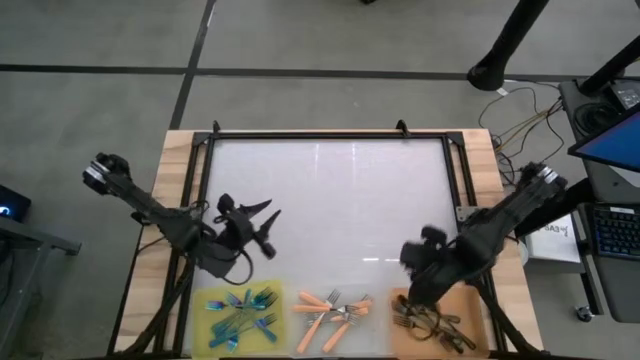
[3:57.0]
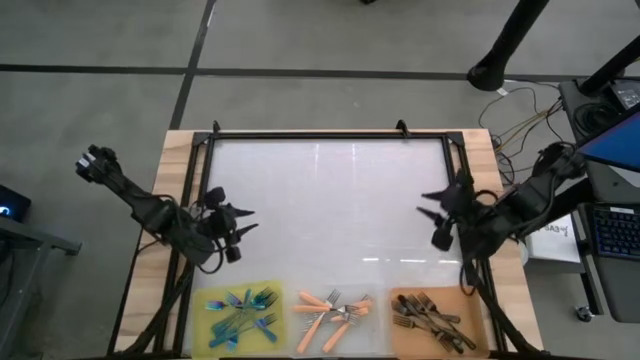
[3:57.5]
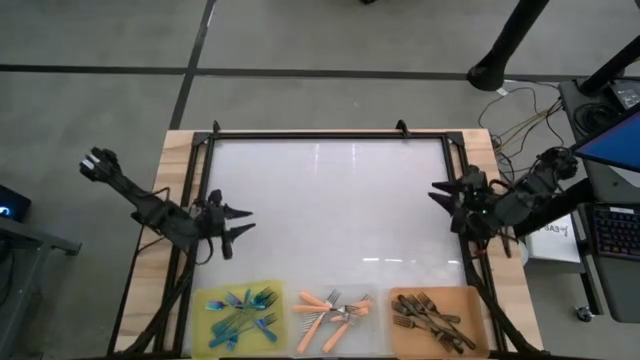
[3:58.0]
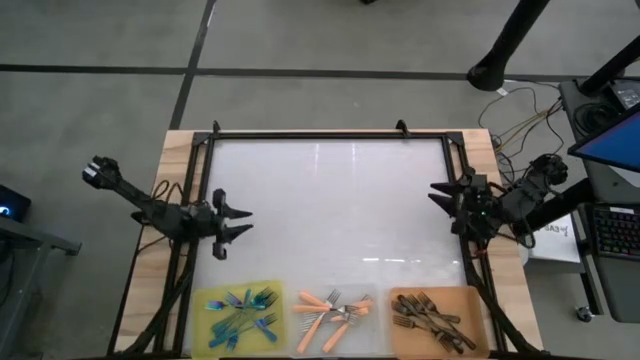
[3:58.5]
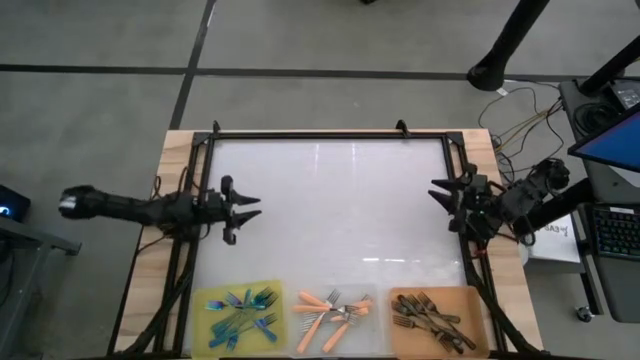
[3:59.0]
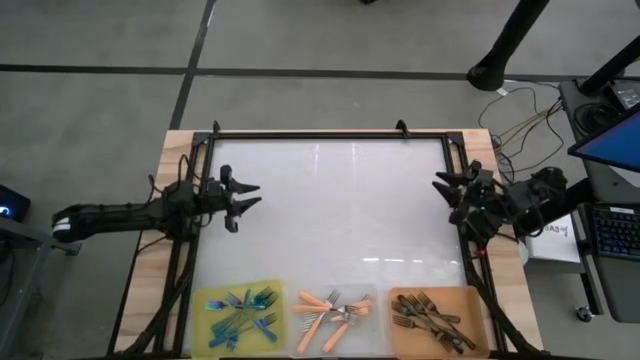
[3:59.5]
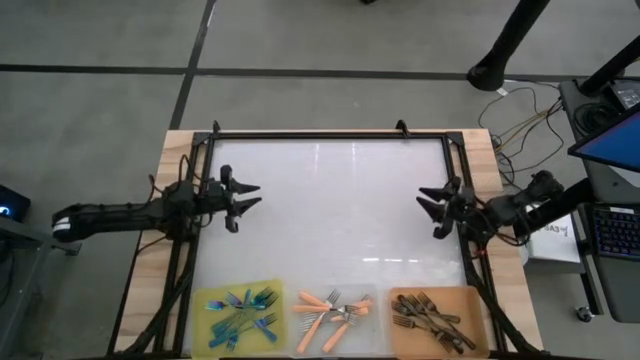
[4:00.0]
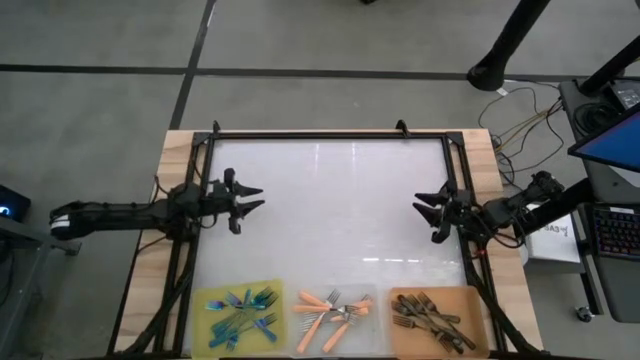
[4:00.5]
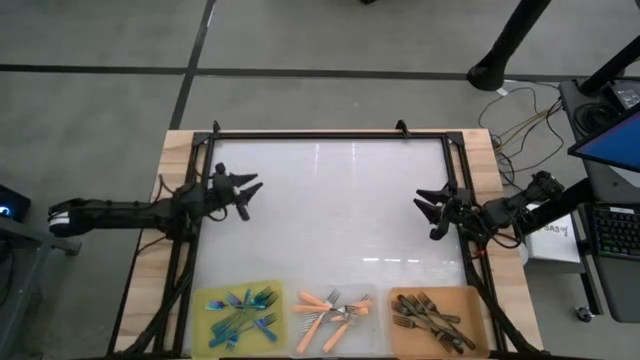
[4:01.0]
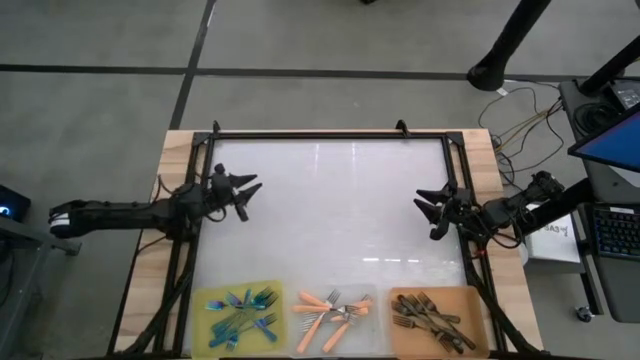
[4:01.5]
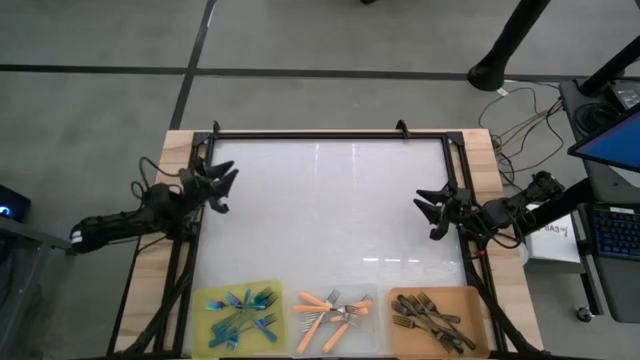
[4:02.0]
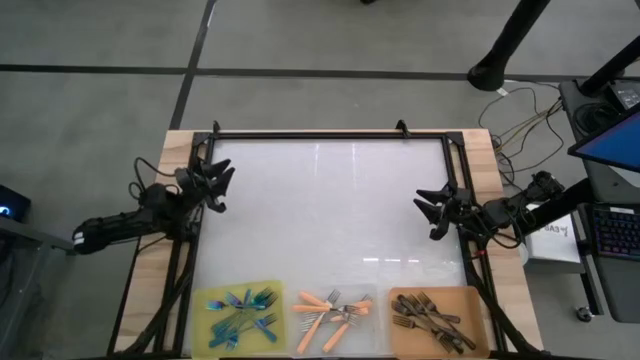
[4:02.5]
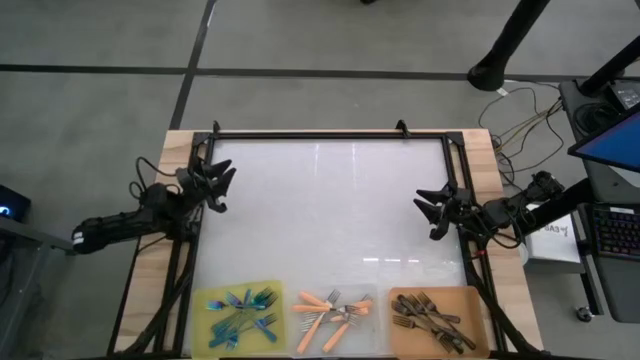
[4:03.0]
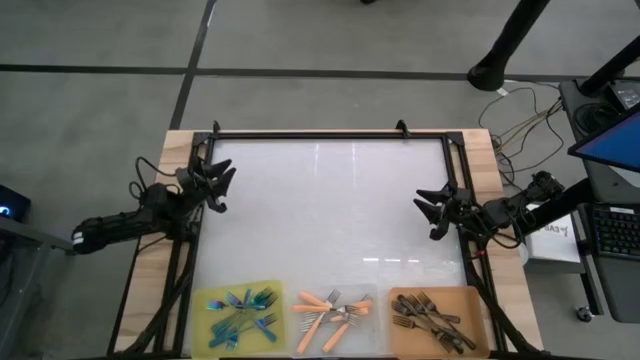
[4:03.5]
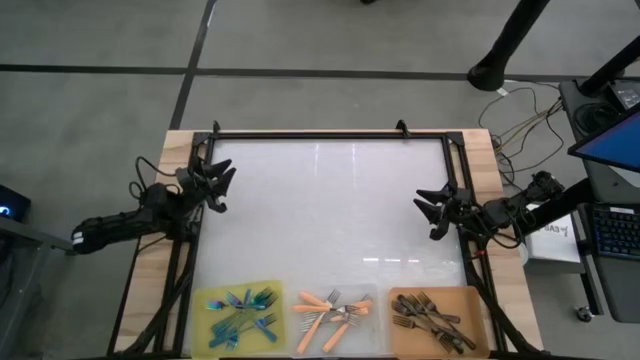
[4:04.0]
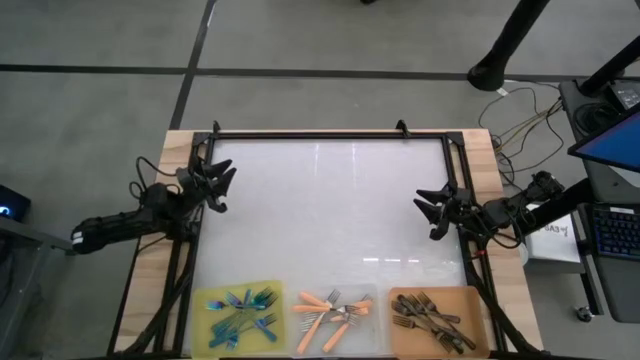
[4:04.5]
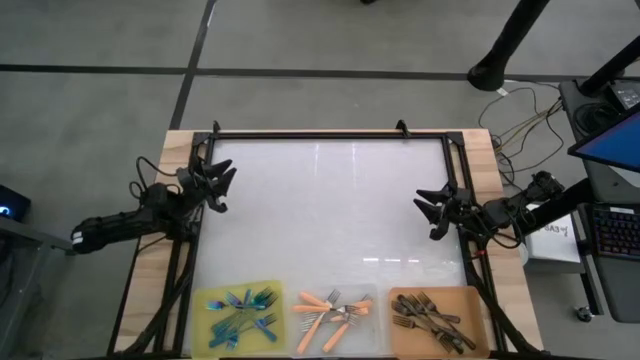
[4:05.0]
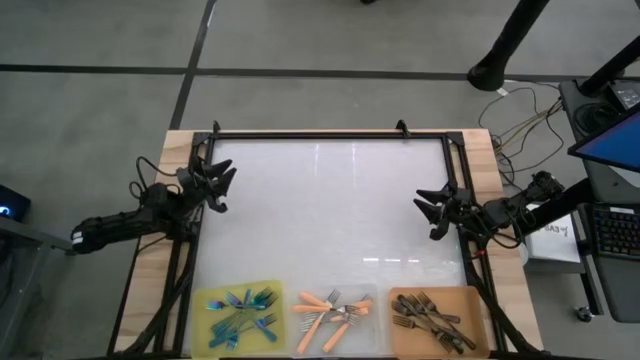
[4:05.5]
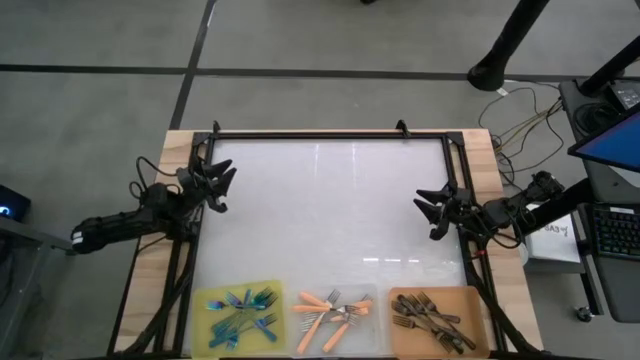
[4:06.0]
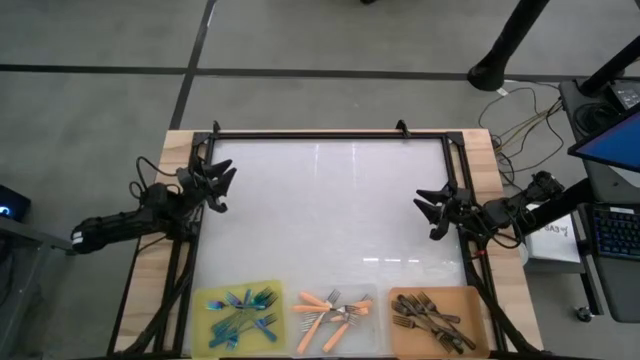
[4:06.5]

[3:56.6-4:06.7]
Task: Sort silverware by color (type)
Return to Home Position

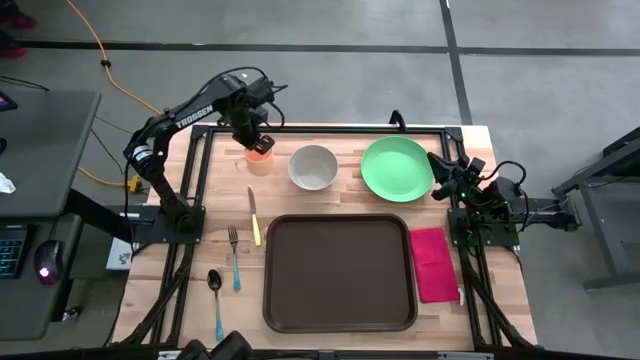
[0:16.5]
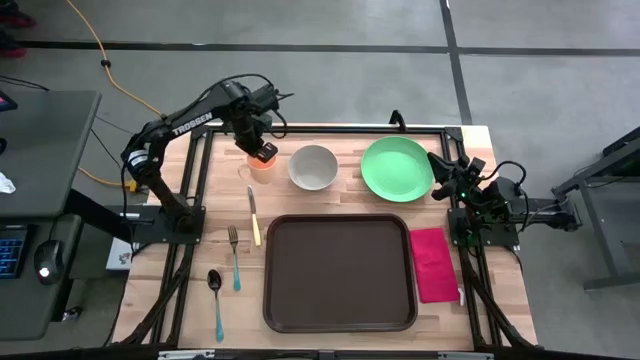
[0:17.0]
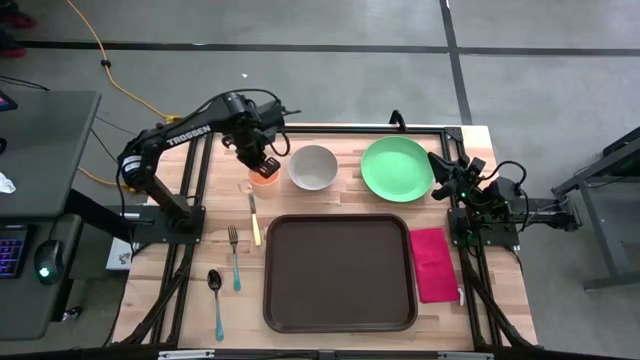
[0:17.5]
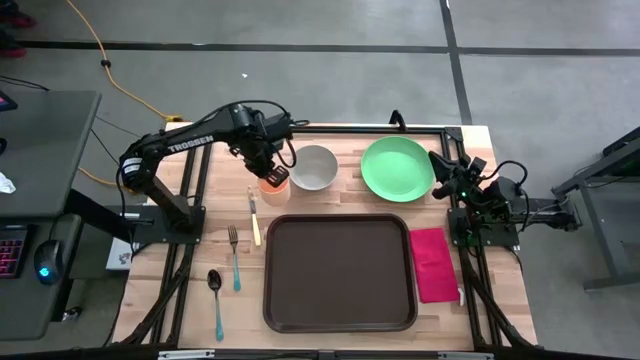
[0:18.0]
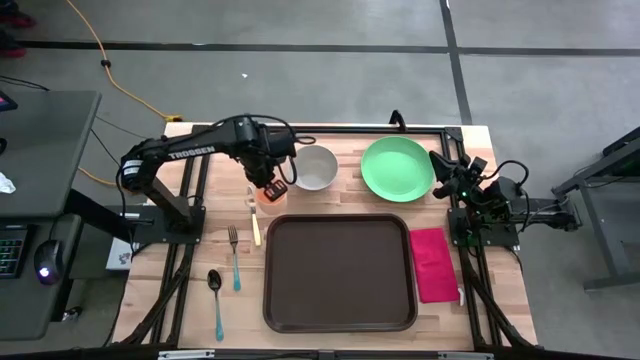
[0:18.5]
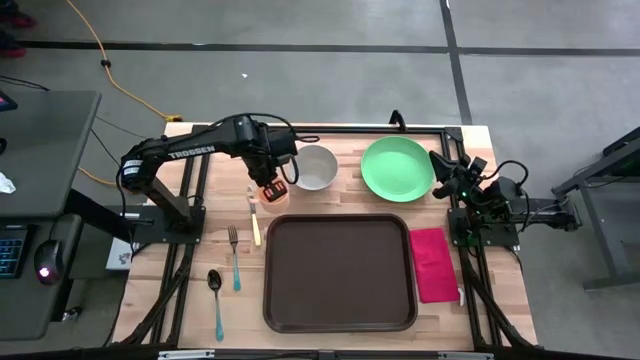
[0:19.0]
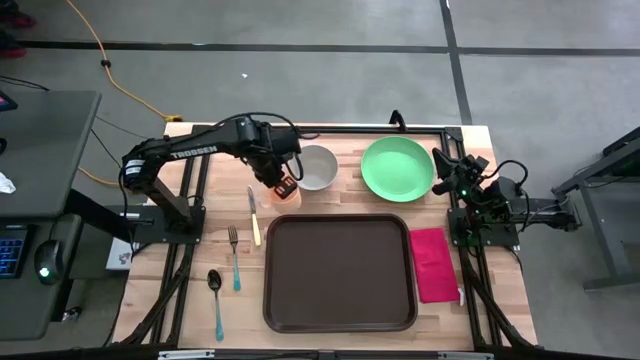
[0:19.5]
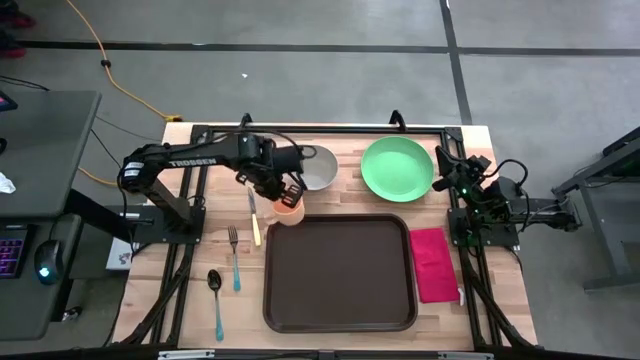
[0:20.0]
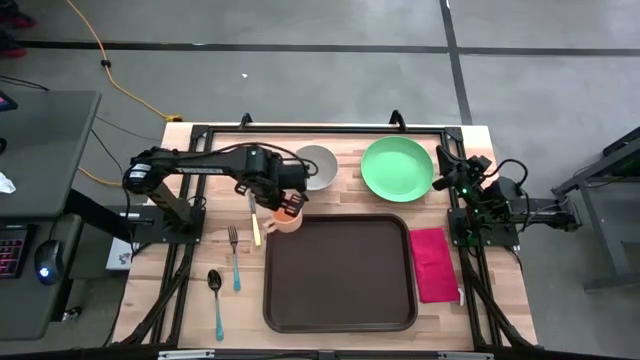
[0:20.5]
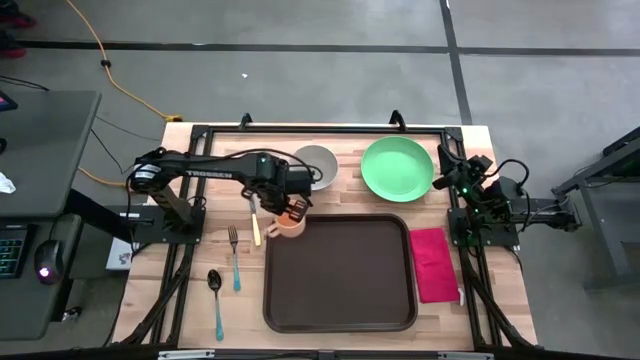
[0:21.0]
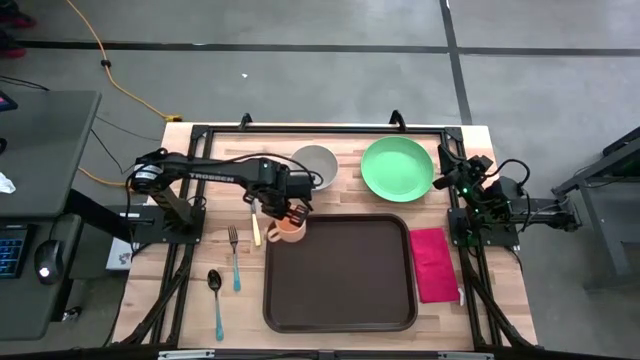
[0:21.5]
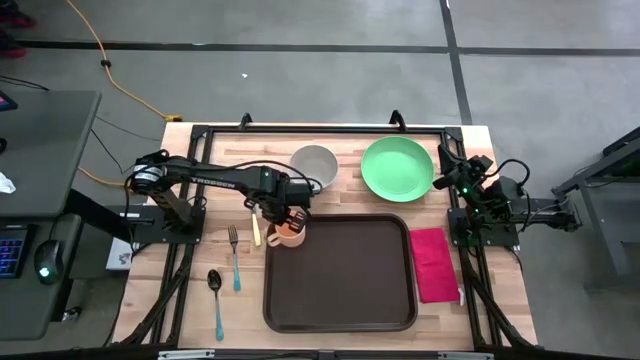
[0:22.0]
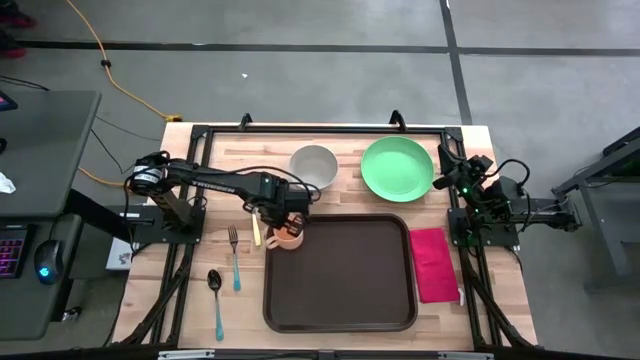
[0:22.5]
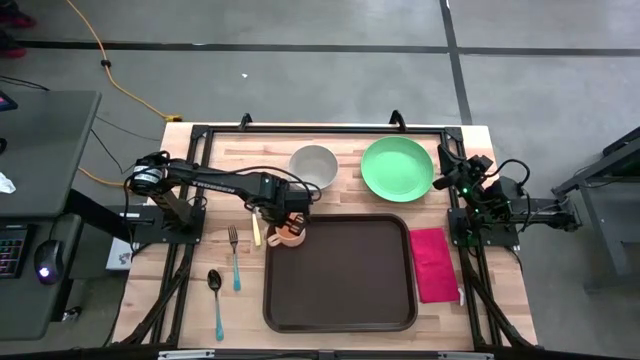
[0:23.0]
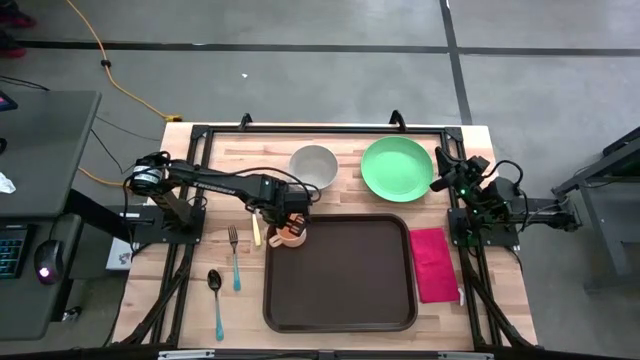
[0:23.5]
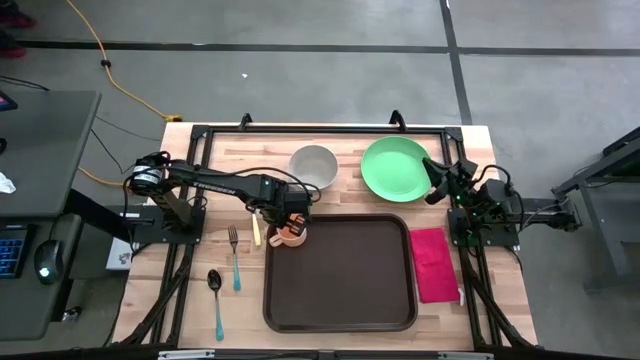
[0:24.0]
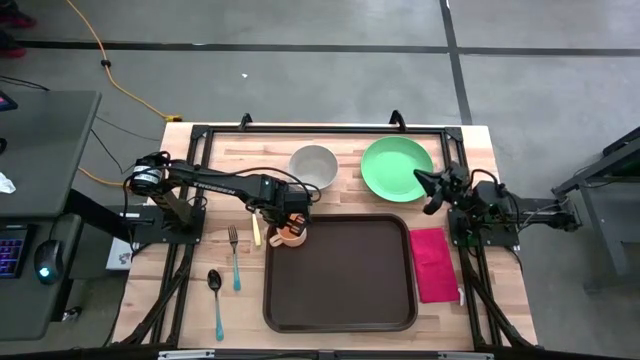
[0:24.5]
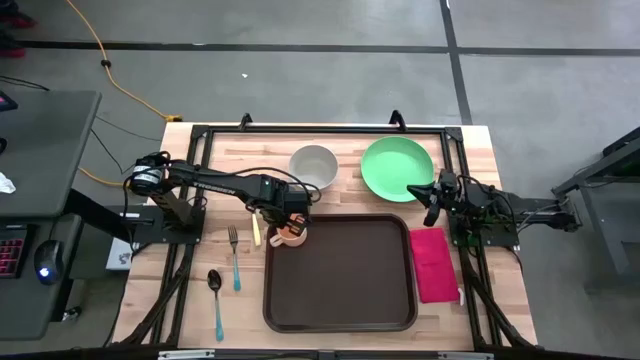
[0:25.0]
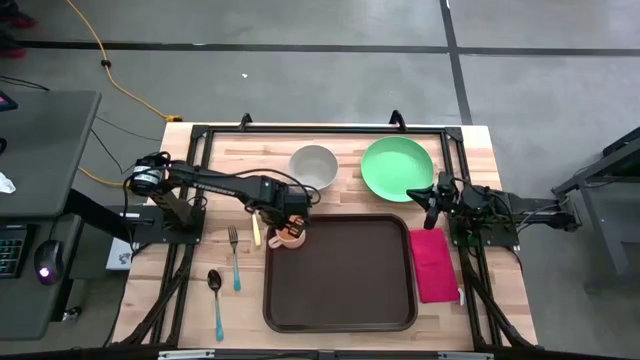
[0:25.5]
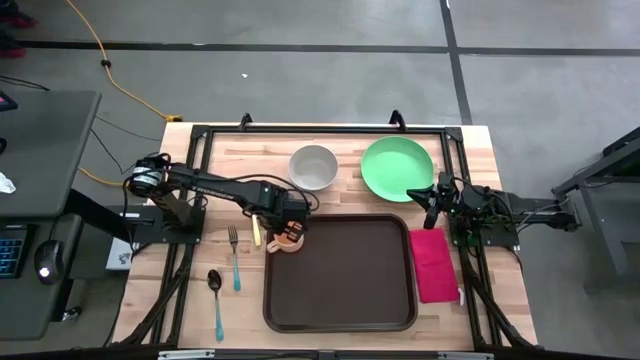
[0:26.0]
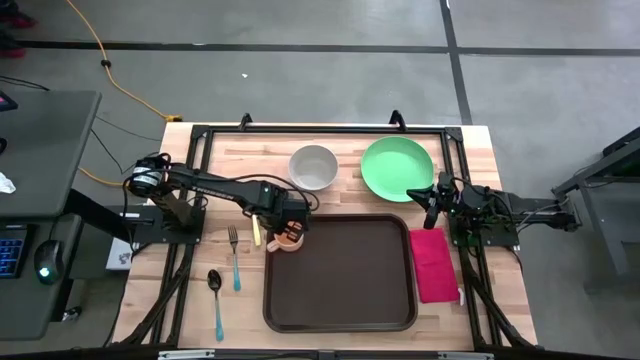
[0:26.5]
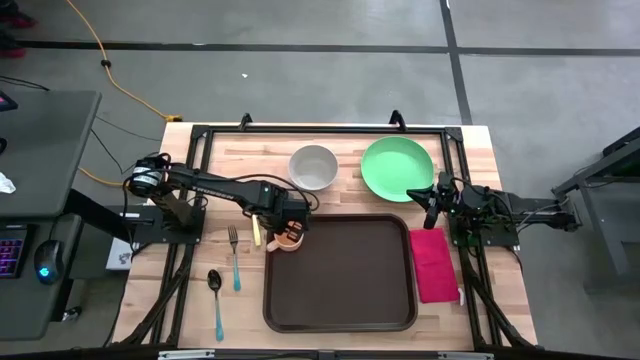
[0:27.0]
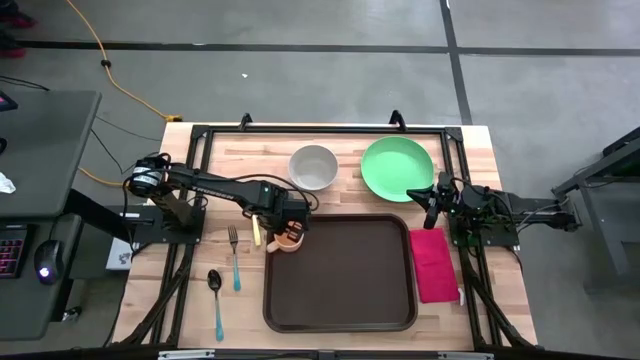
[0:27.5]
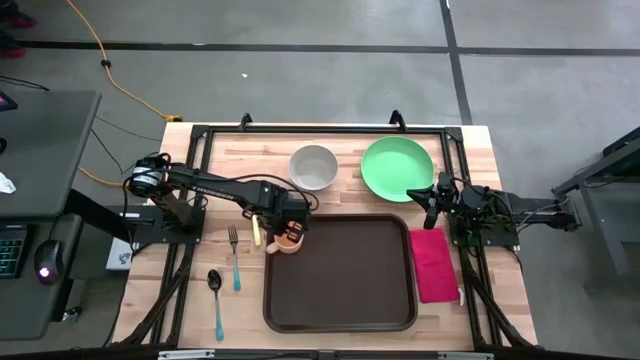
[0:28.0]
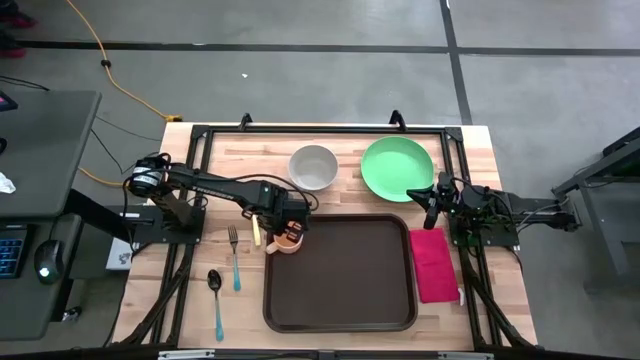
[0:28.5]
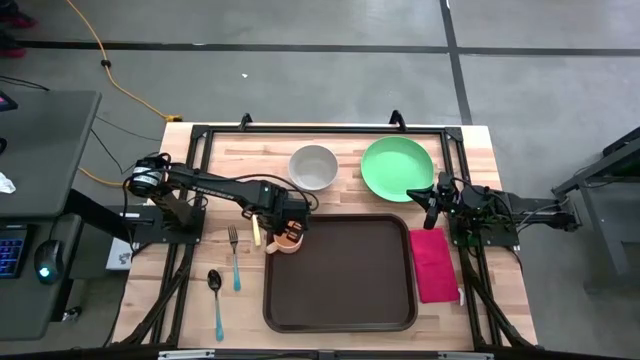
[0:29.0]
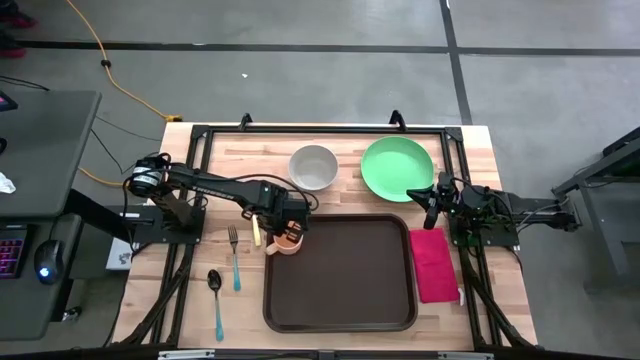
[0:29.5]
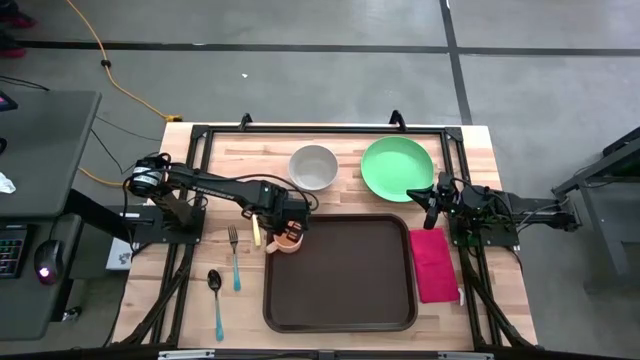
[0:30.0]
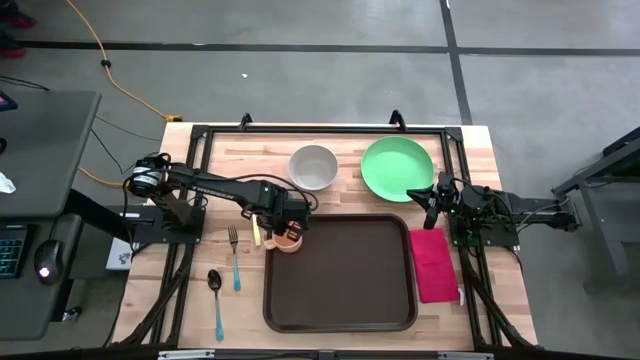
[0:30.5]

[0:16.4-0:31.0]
Task: Set up tray
Put the peach mug on the black tray
